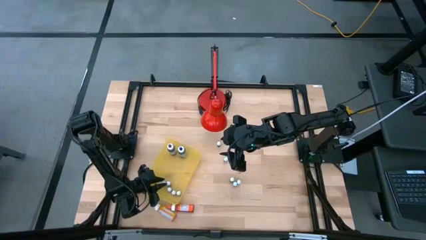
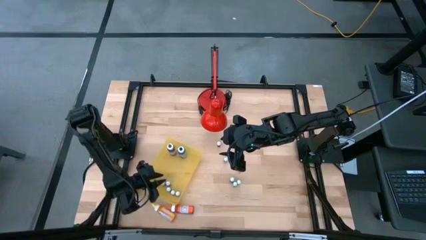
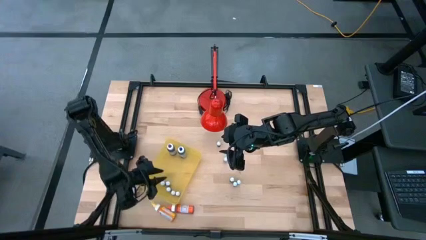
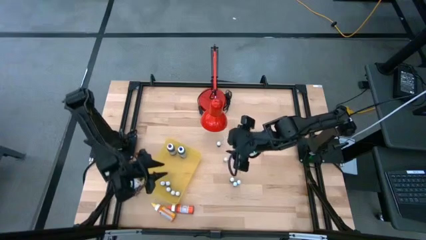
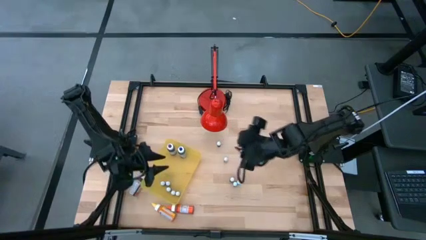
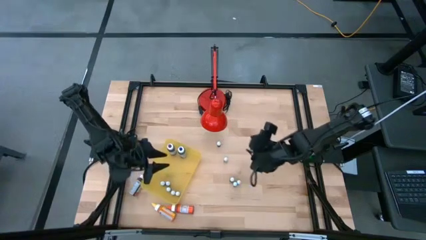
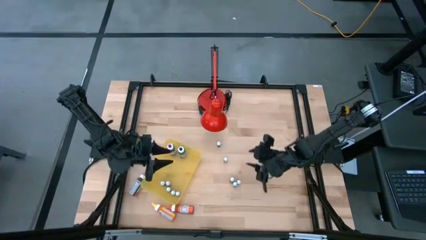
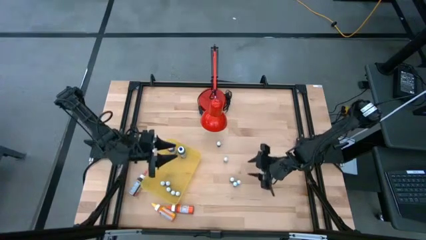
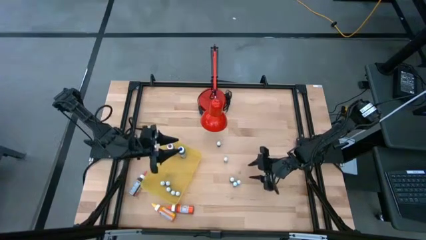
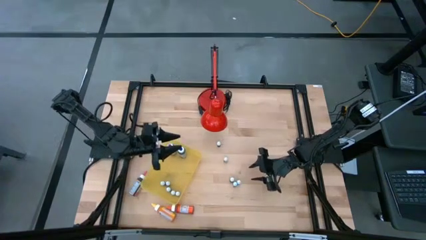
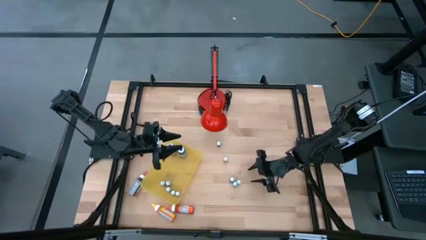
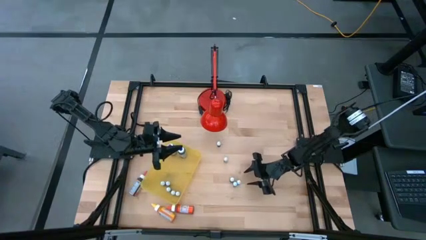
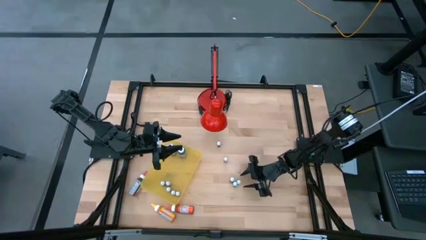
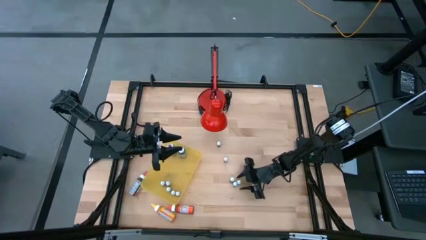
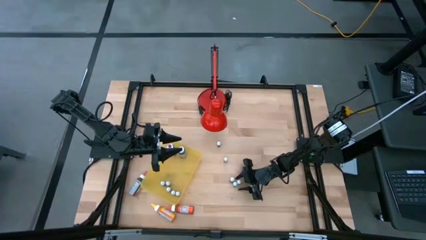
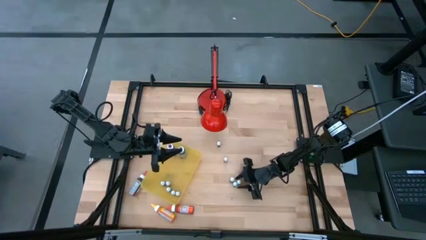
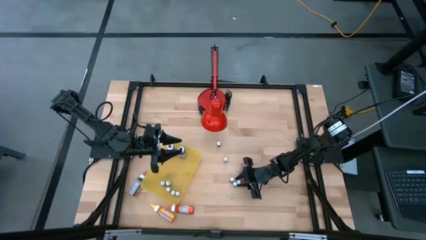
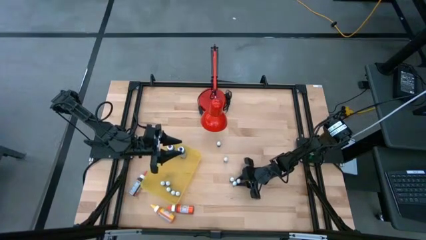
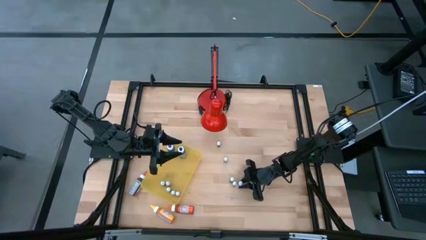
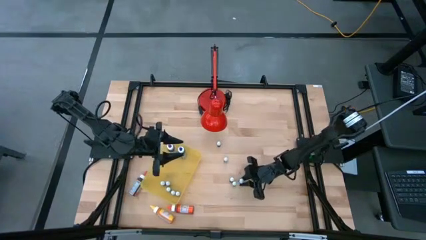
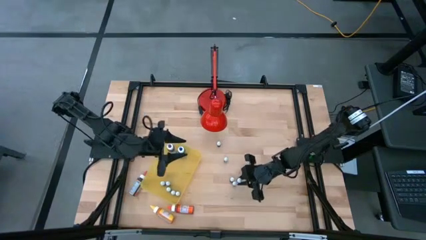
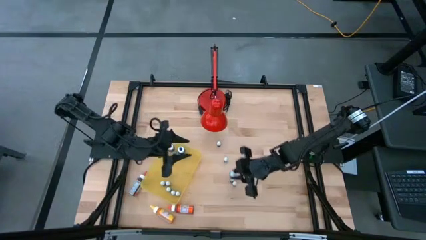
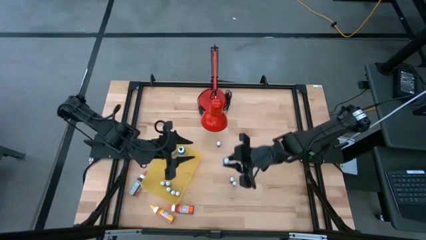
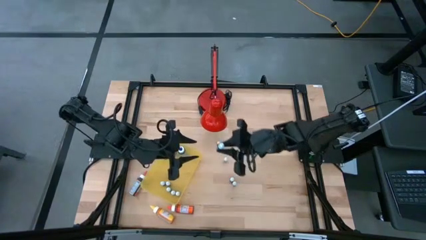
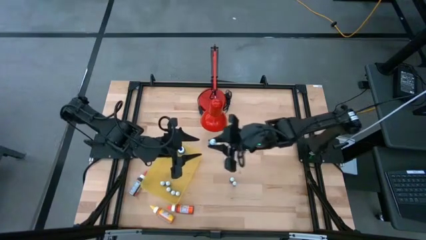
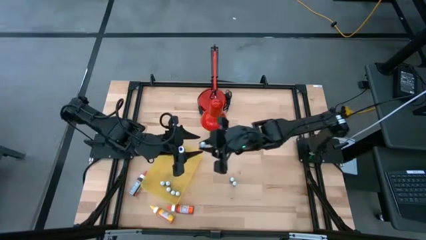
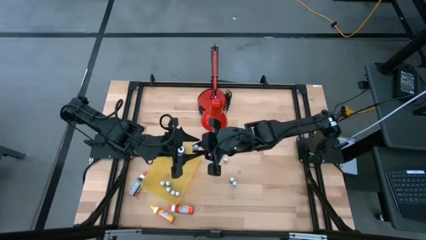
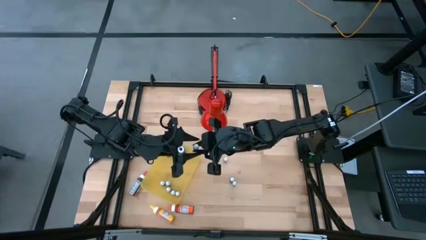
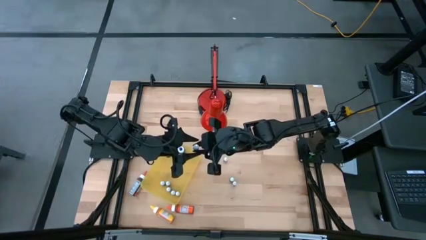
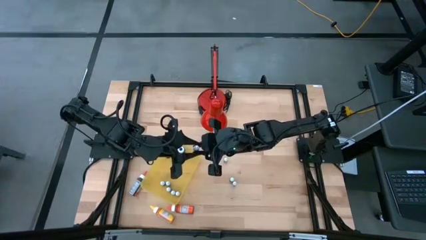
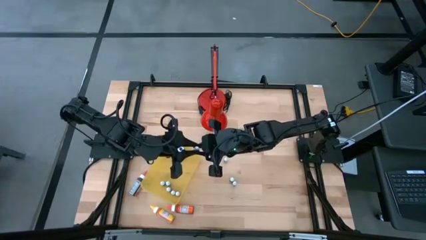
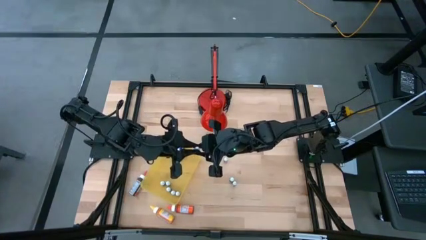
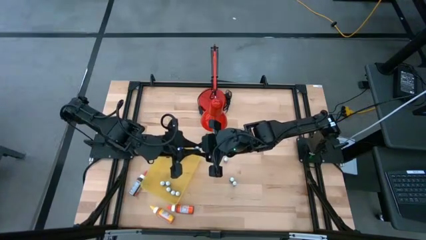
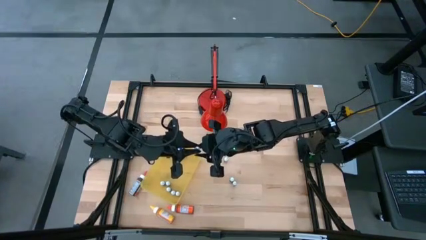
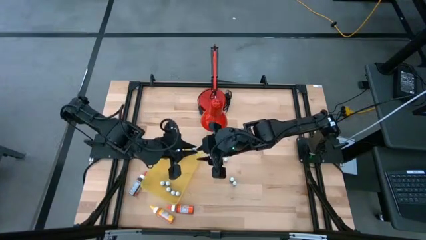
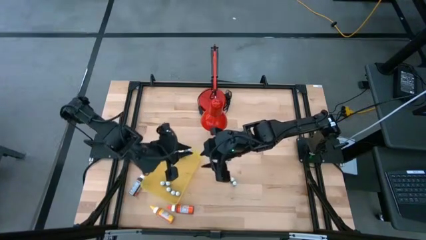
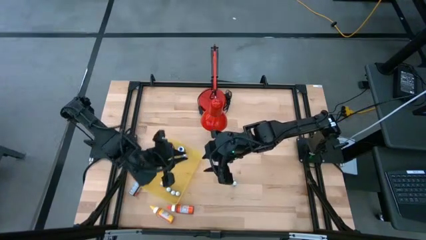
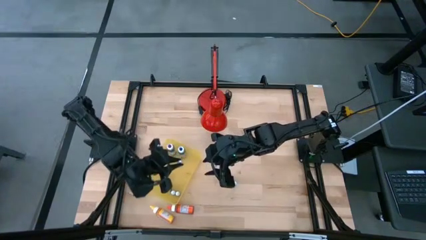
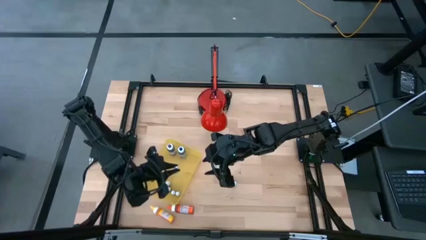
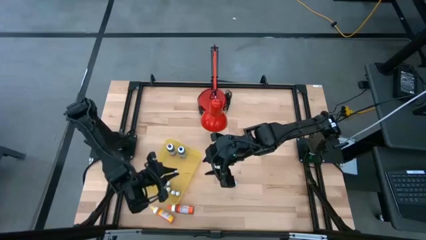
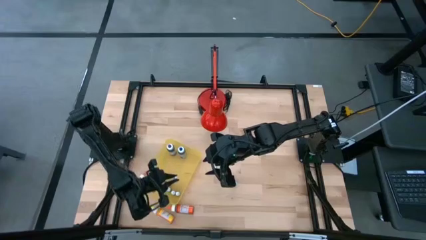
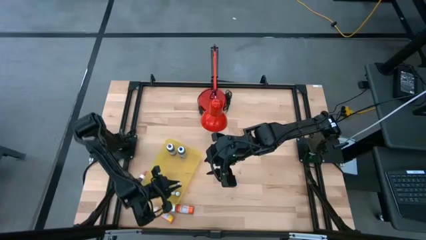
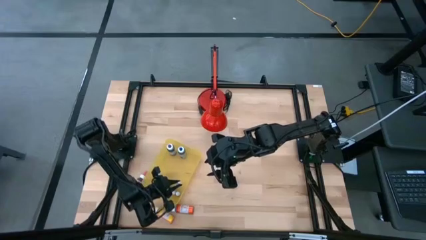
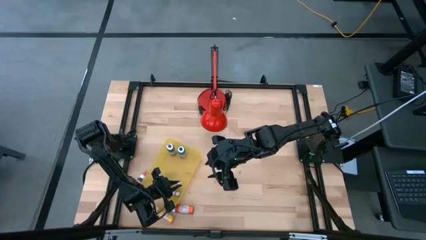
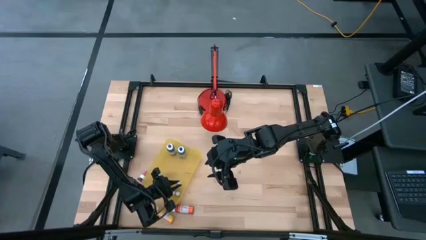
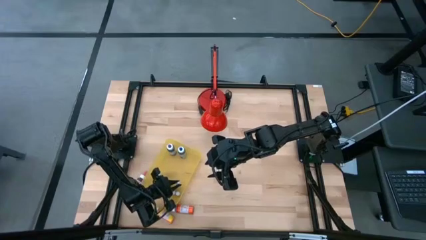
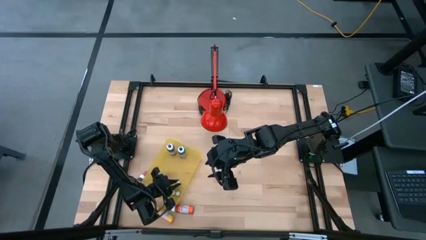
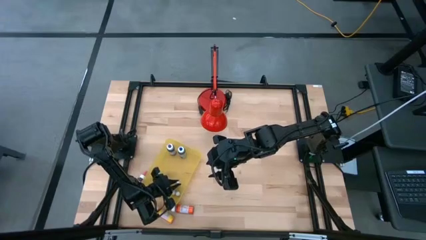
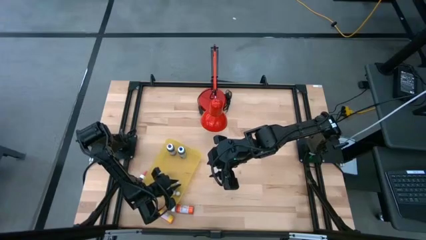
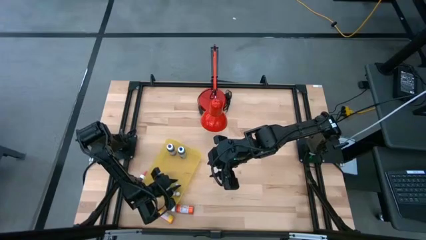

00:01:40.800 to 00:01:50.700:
Task: Pick & Place food coloring
Put the right small blue food coloring bottle into the yellow bin

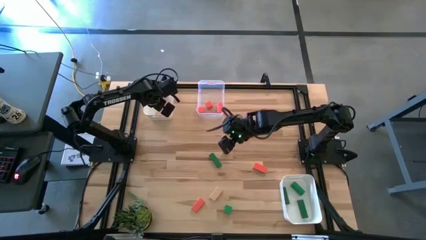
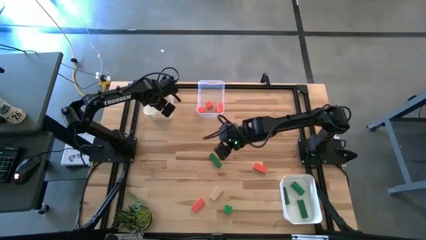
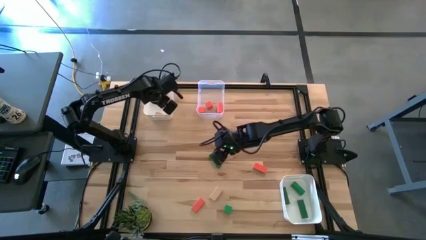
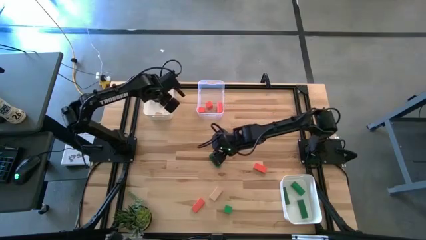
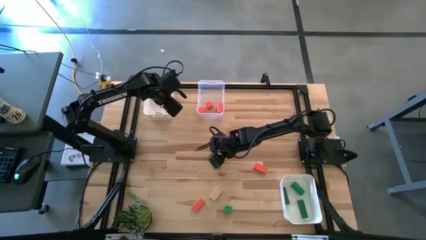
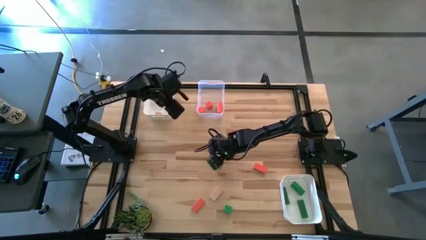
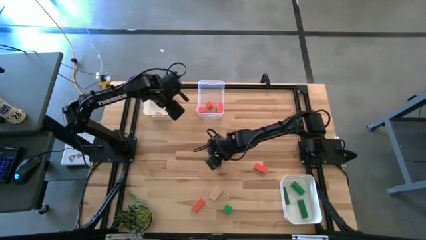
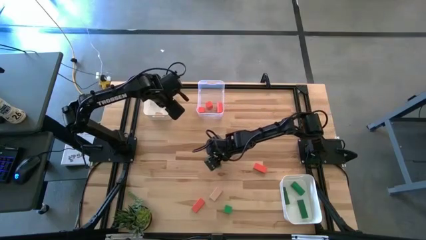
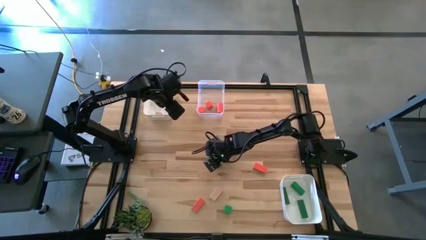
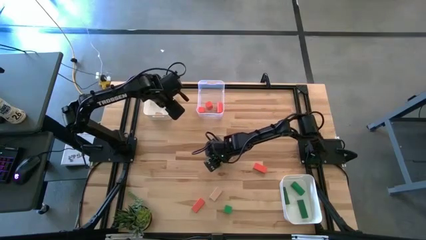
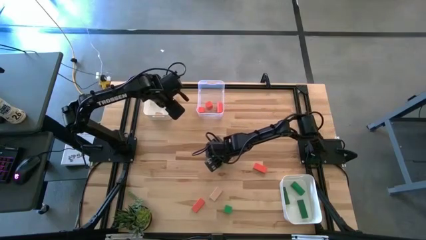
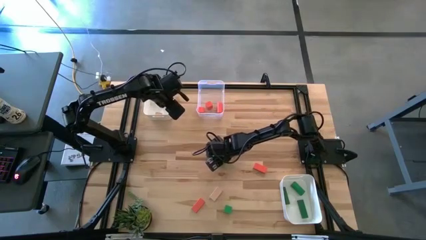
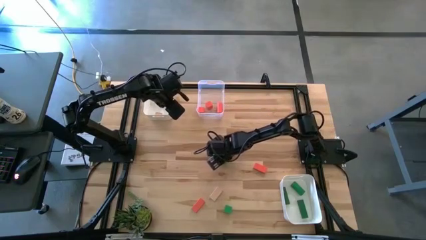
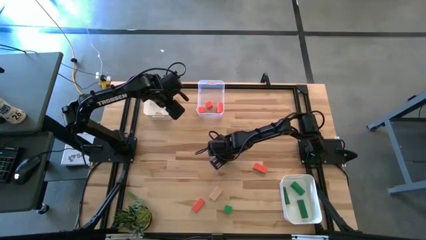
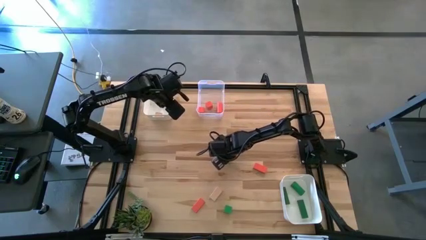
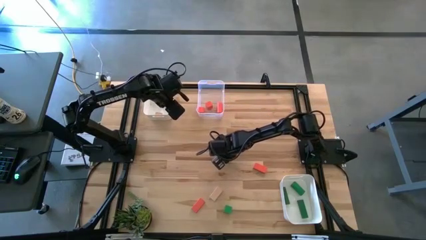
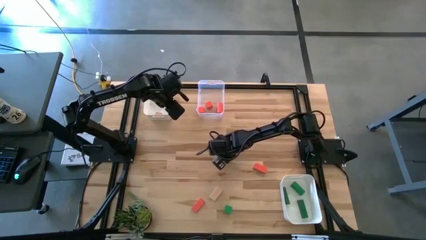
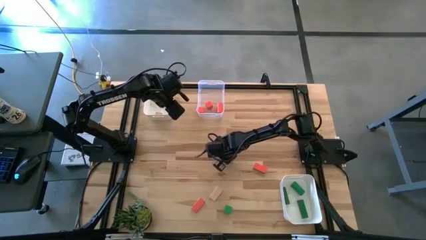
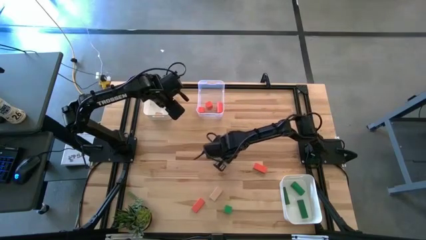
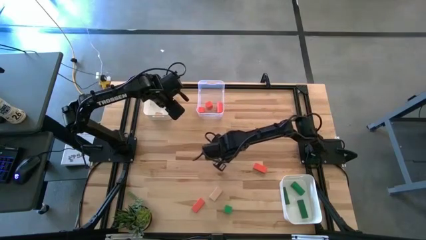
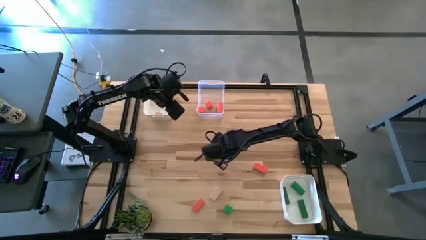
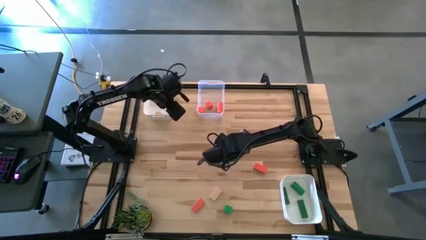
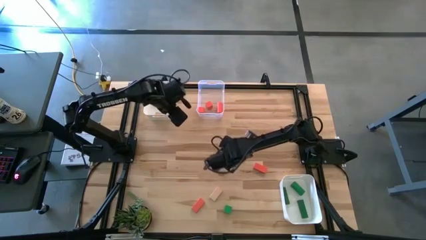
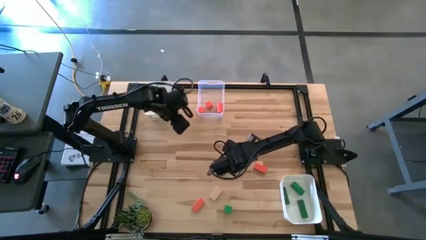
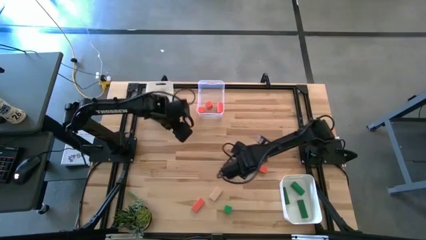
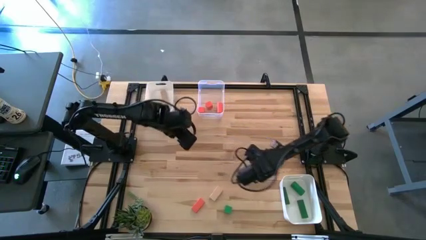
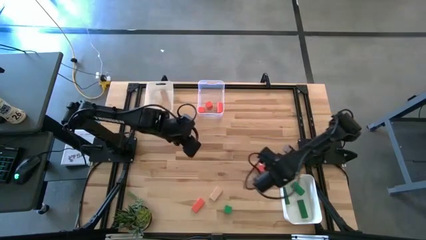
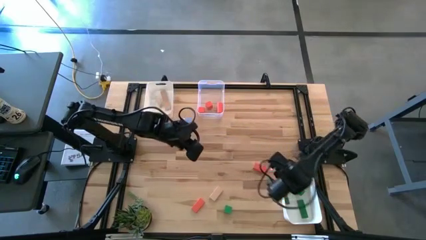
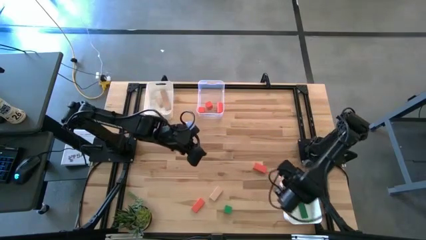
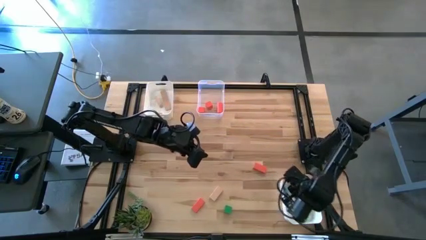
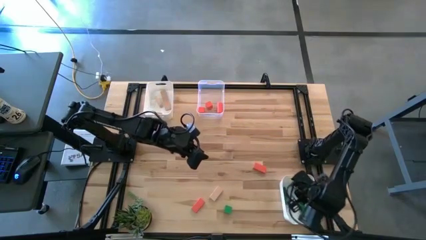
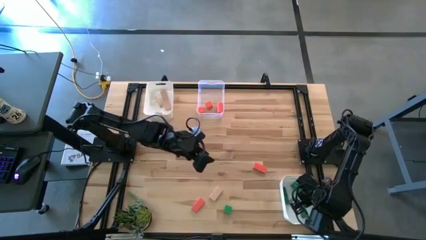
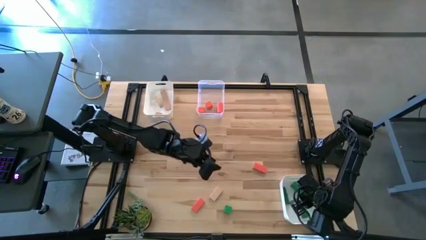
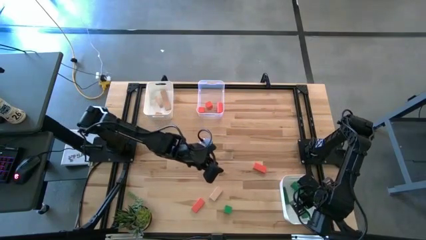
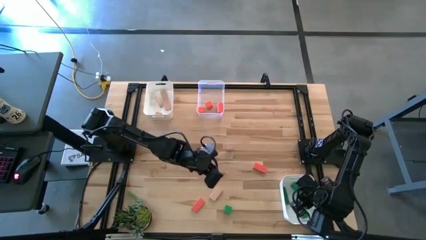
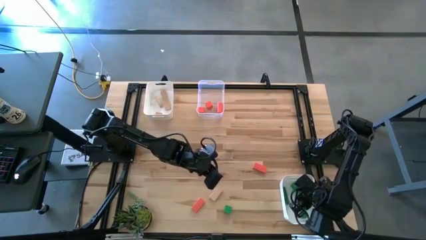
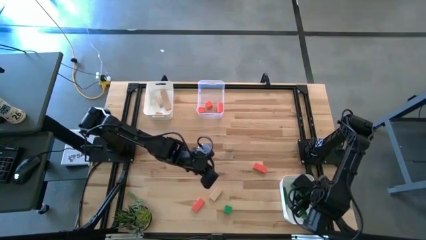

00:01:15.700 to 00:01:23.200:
Task: Sort & place blocks by color
Put the green block into the bottom white bin
